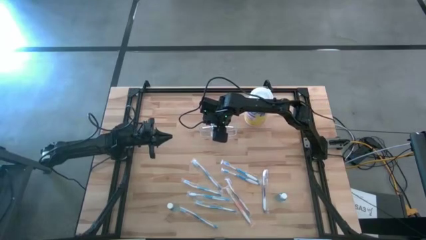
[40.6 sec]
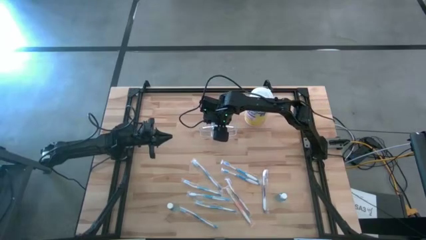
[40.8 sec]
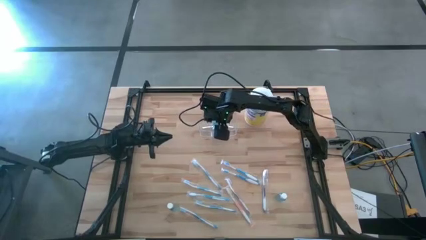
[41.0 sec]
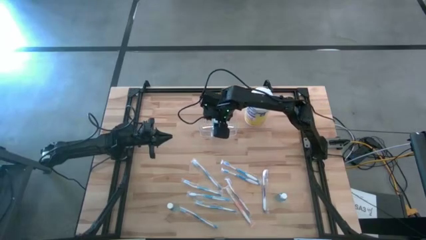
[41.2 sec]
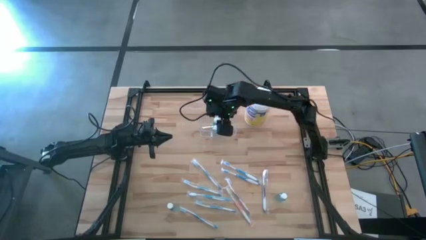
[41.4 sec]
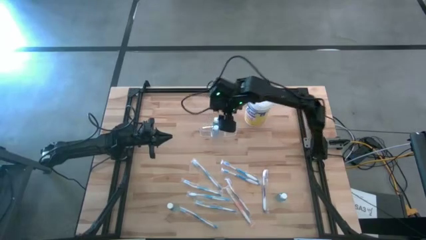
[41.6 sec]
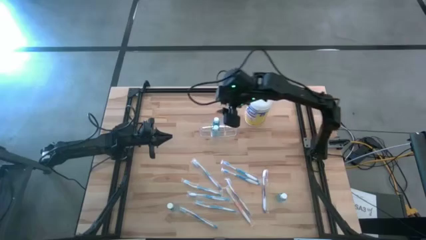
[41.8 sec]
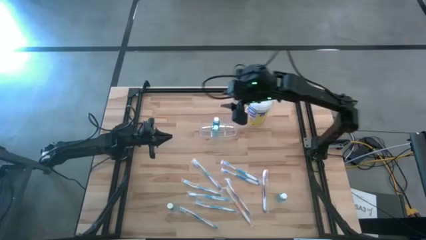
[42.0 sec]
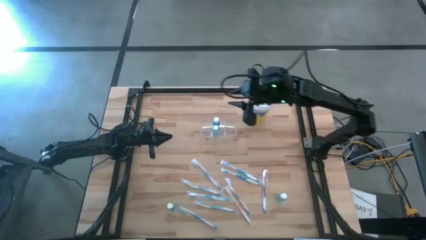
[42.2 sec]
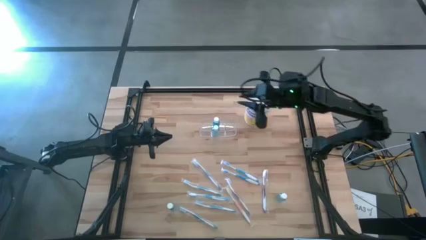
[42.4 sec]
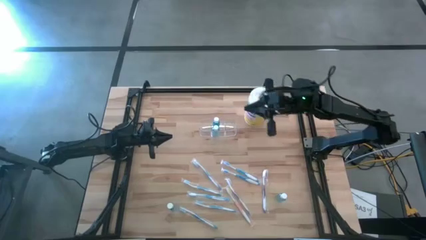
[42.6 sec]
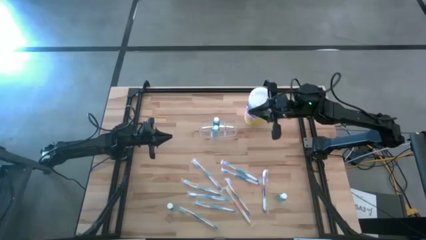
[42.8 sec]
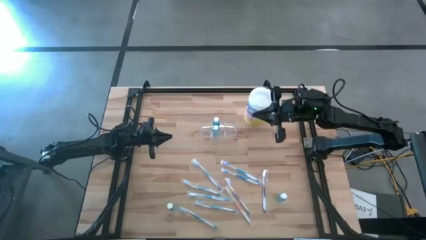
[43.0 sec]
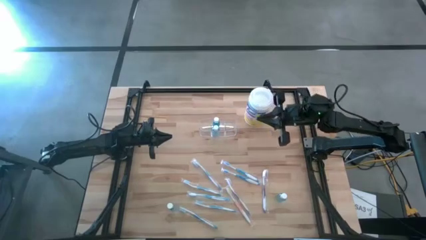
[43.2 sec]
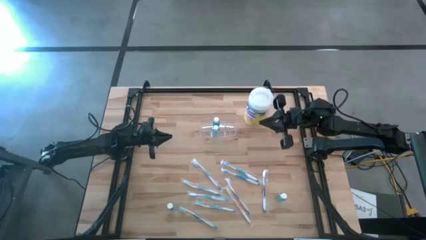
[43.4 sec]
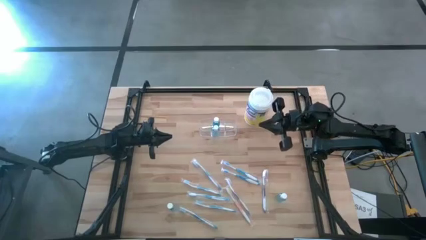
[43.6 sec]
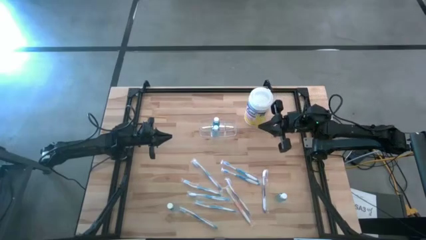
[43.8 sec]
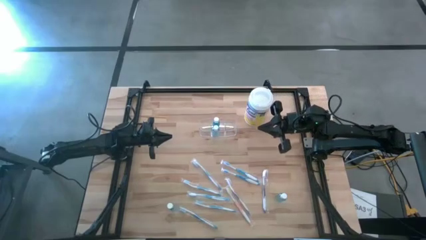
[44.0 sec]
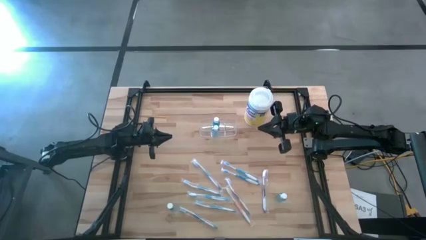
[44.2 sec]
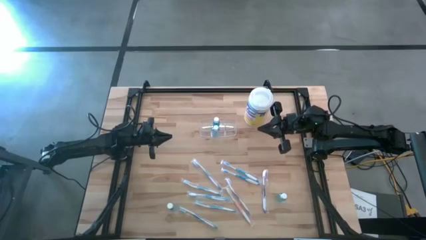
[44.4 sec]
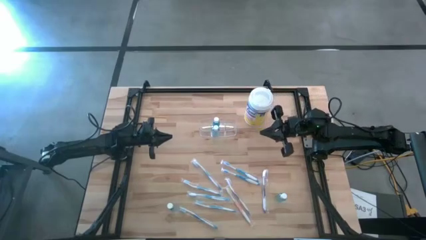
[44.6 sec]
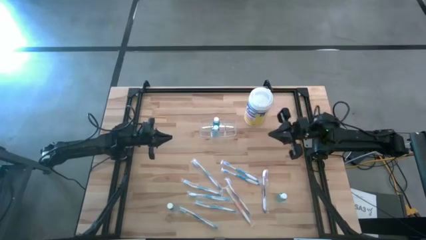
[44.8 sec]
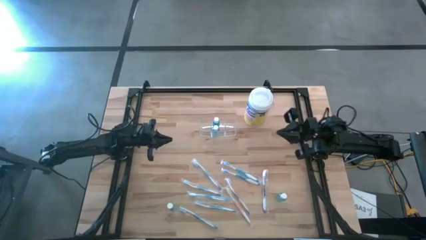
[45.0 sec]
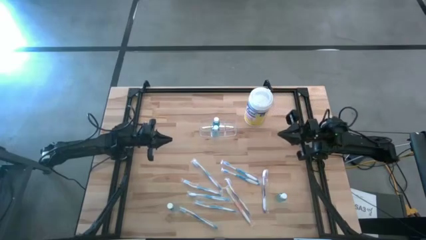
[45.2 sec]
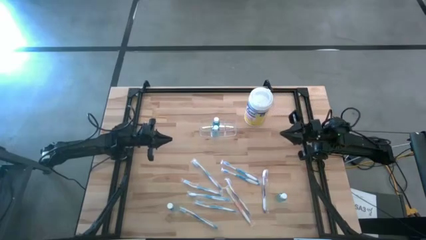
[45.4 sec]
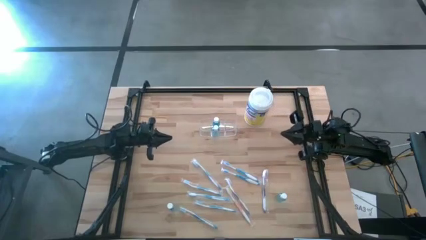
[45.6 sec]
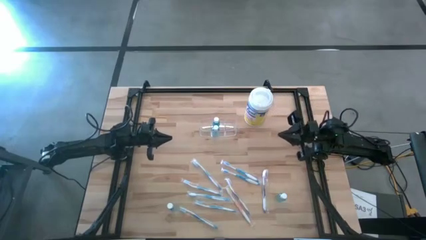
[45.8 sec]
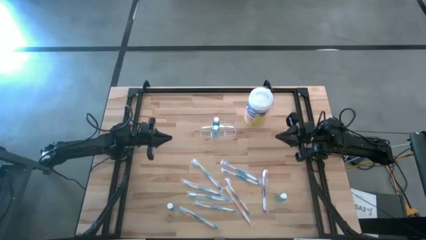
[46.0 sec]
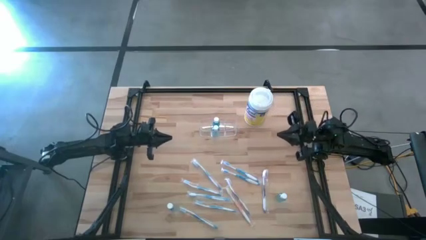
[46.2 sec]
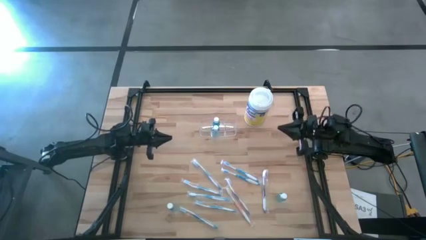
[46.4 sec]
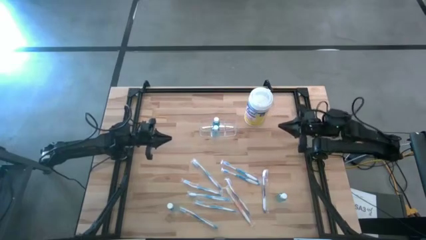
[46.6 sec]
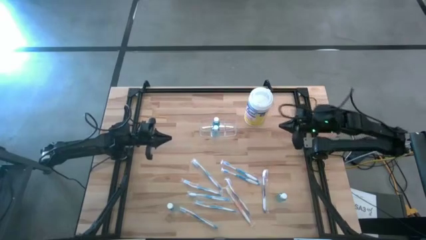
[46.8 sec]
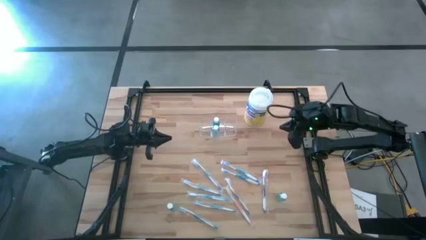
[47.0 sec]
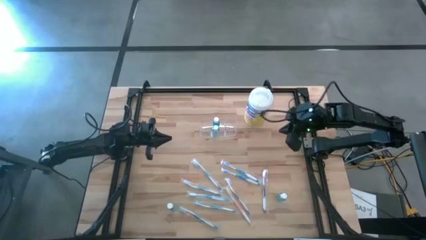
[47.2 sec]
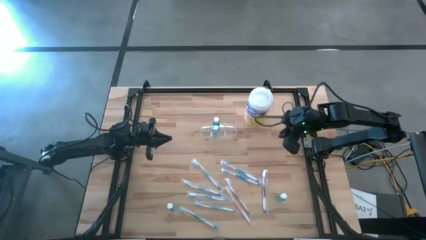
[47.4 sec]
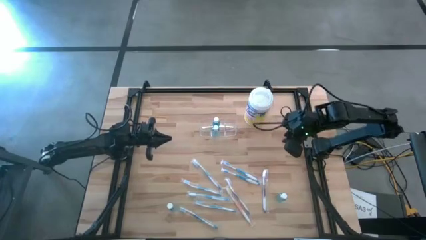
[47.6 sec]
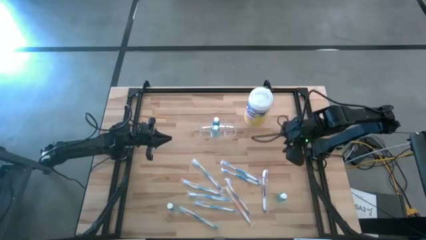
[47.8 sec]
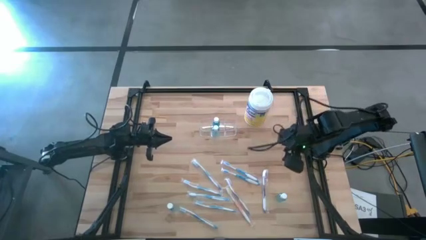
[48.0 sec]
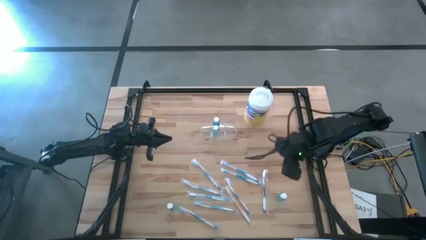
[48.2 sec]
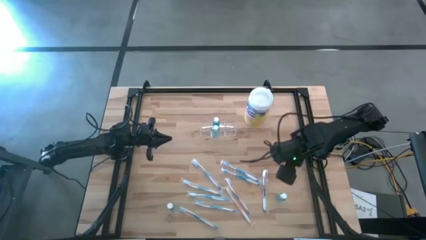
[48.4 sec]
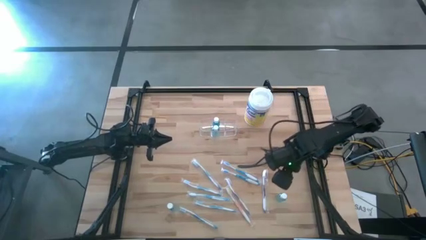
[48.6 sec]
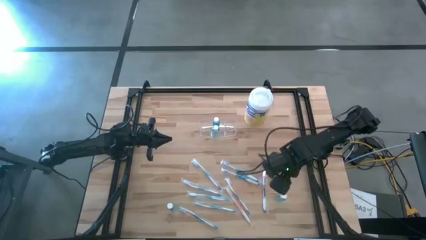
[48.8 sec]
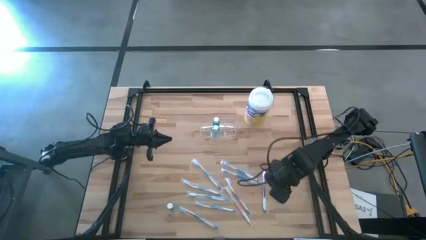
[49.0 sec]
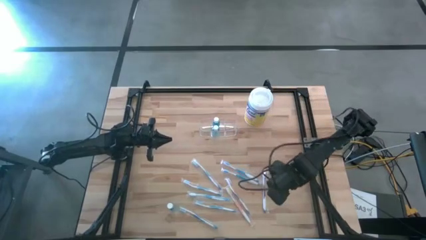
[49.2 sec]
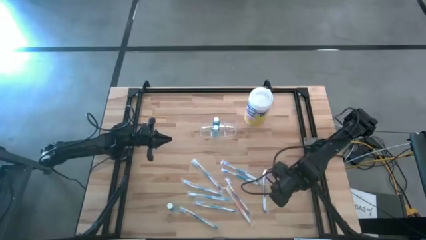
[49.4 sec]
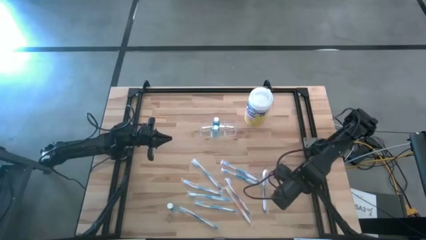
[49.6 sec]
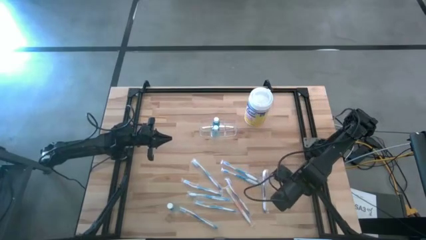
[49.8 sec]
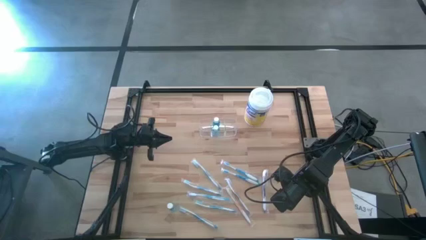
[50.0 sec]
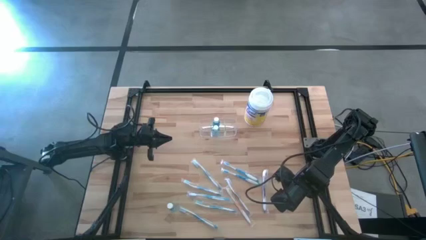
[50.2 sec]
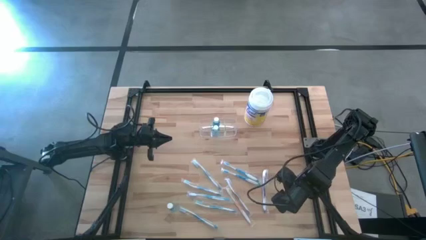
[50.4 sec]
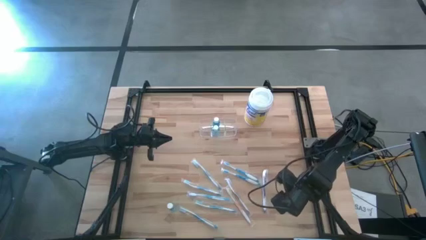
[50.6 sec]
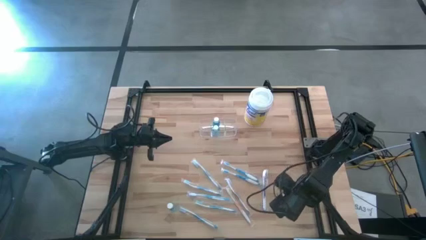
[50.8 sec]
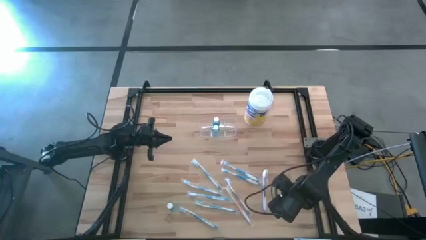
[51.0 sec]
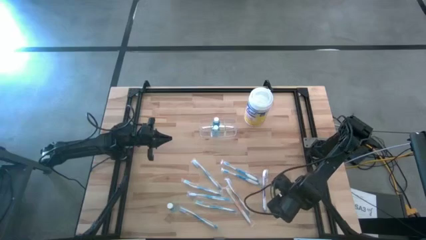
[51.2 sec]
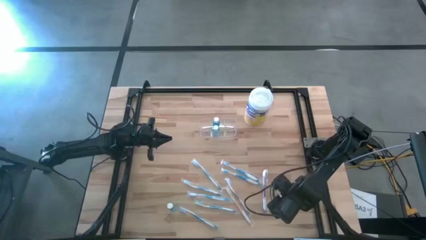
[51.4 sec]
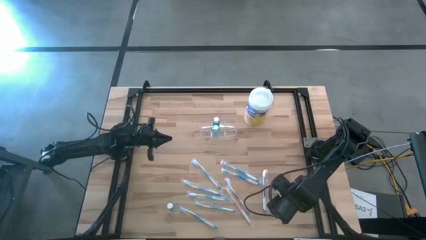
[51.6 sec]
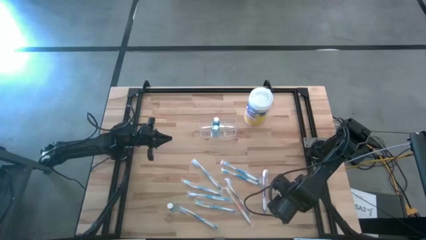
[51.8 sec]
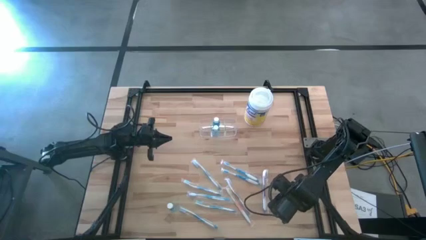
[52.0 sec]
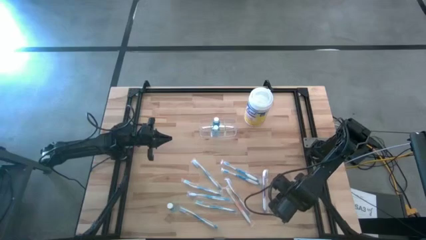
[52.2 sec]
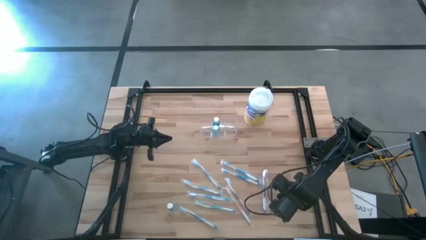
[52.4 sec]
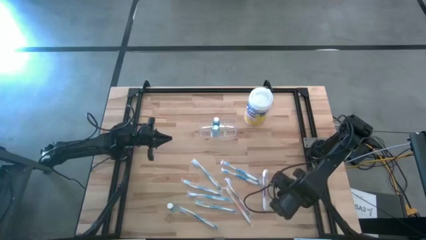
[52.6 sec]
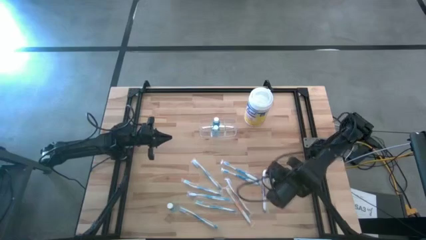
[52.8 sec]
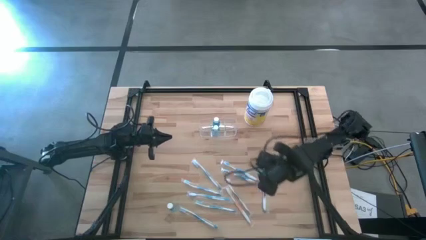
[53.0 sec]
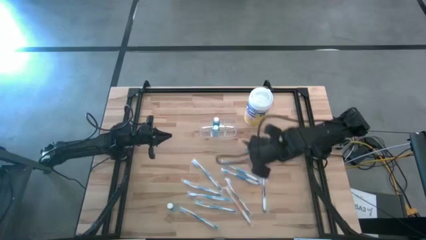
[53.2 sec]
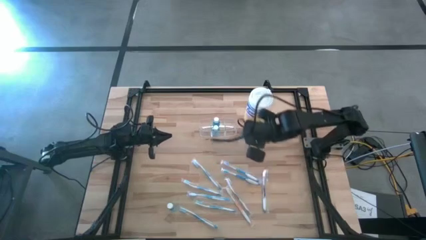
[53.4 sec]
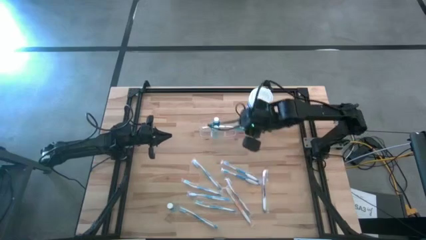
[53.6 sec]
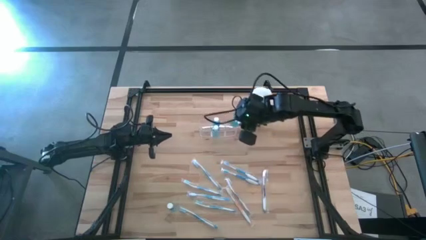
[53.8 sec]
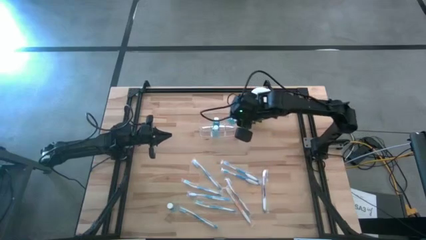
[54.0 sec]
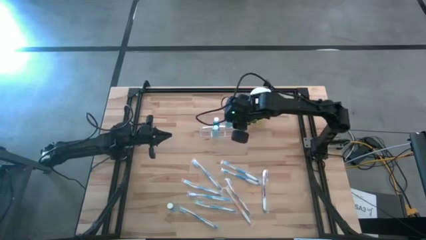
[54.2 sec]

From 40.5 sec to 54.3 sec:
Task: Pick & Place toothbrushing station
Put the blue mouthwash into the transparent organizer
